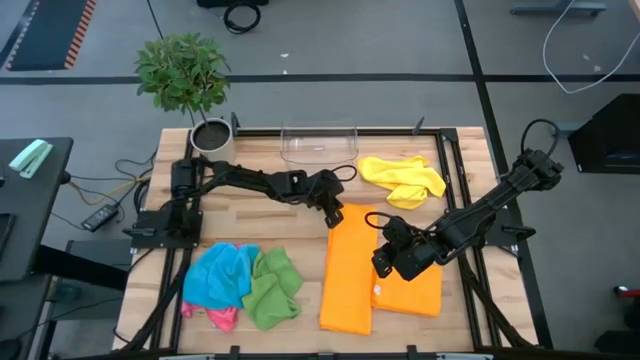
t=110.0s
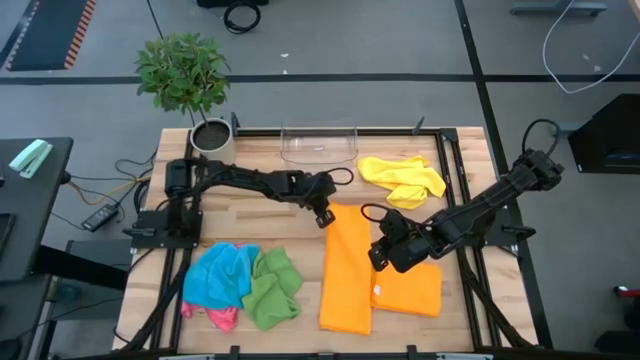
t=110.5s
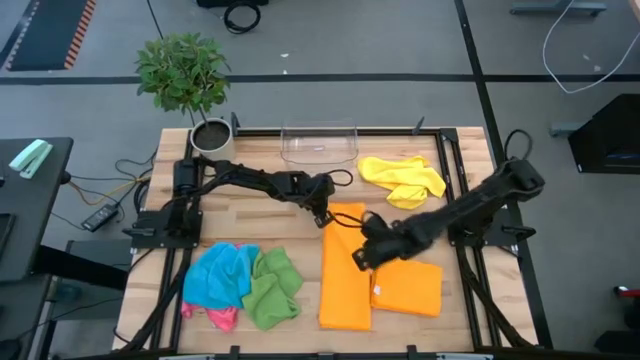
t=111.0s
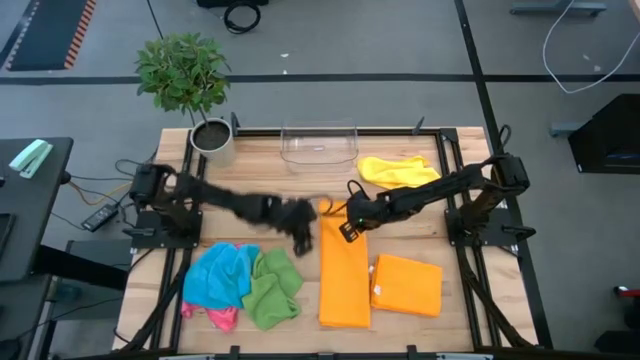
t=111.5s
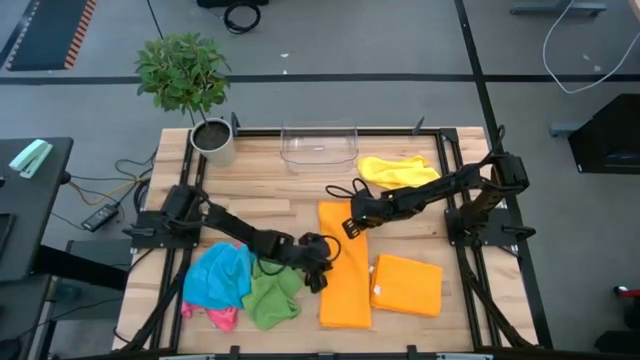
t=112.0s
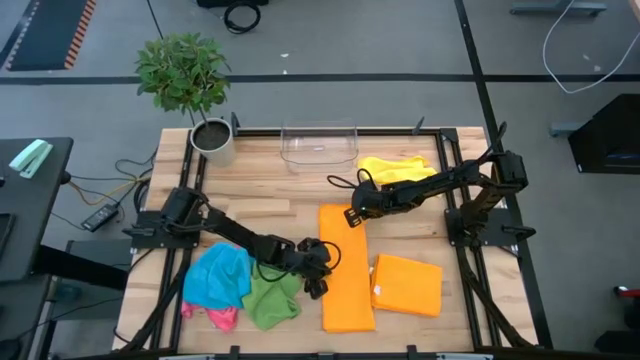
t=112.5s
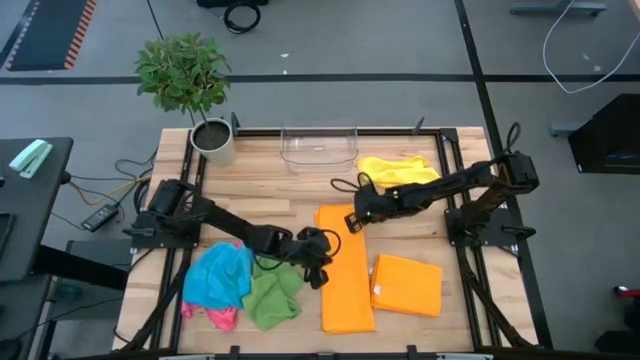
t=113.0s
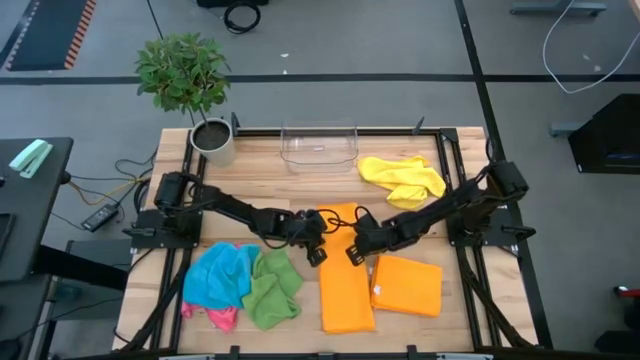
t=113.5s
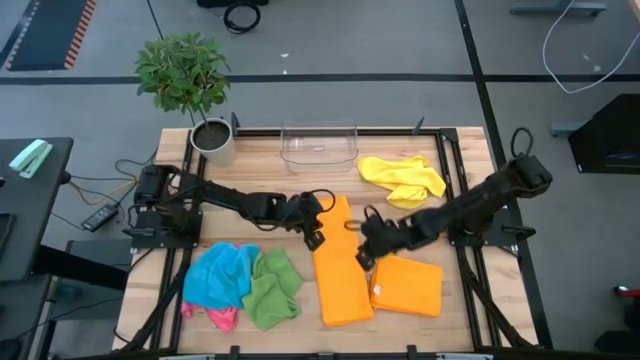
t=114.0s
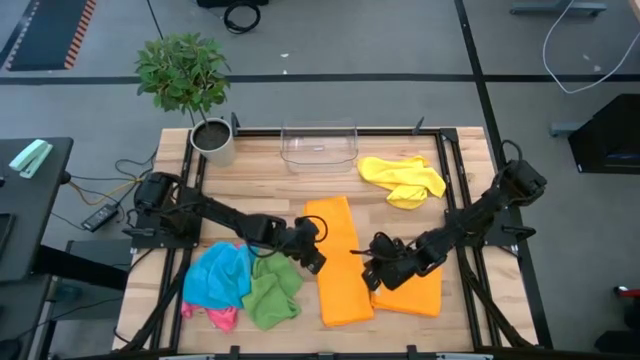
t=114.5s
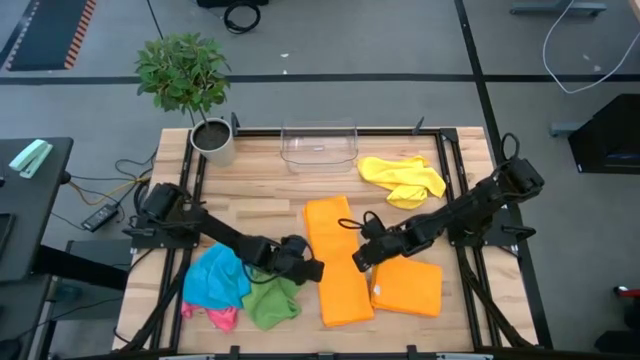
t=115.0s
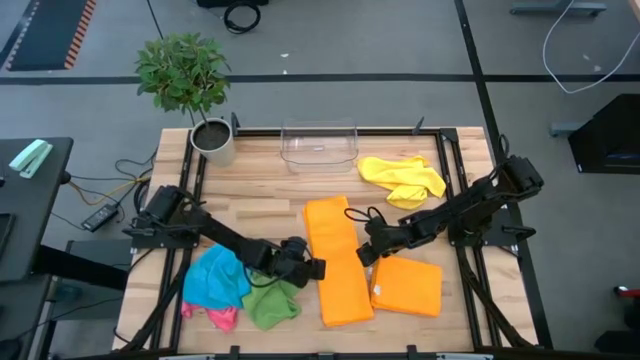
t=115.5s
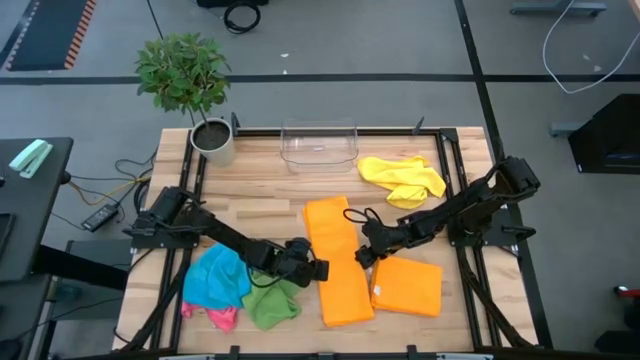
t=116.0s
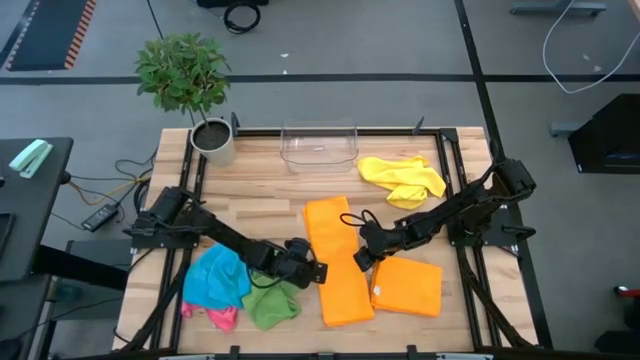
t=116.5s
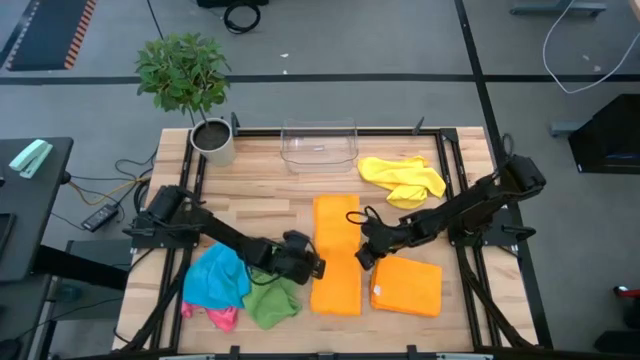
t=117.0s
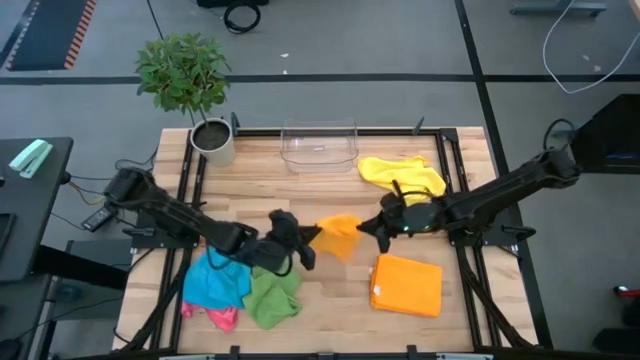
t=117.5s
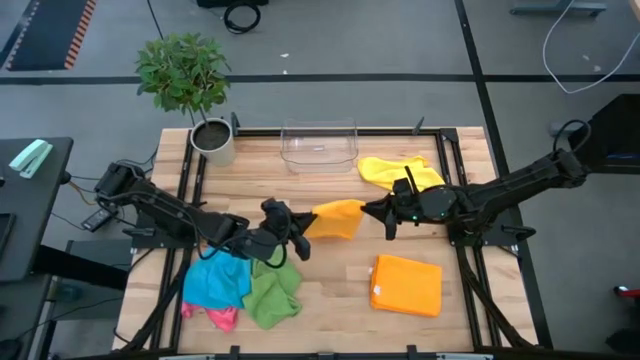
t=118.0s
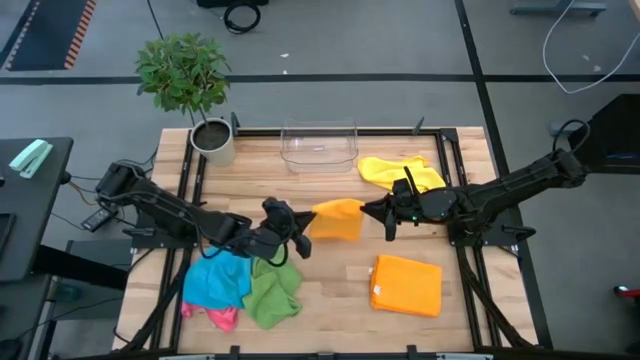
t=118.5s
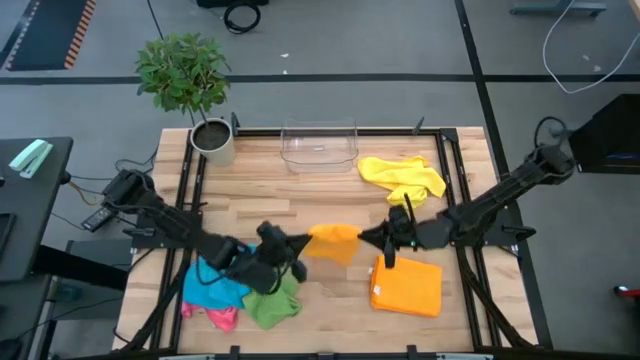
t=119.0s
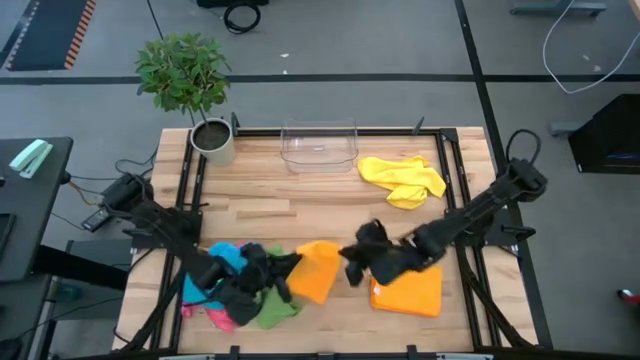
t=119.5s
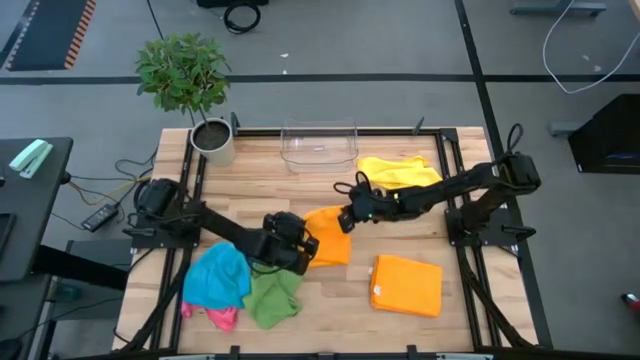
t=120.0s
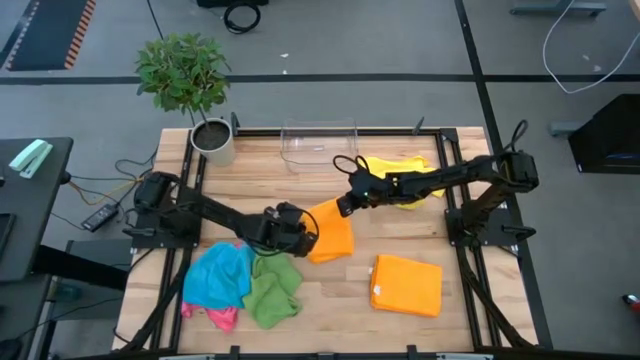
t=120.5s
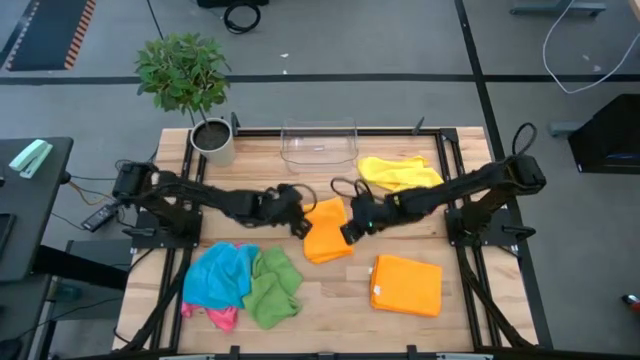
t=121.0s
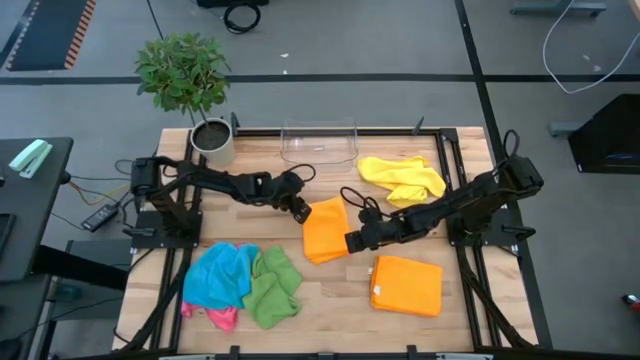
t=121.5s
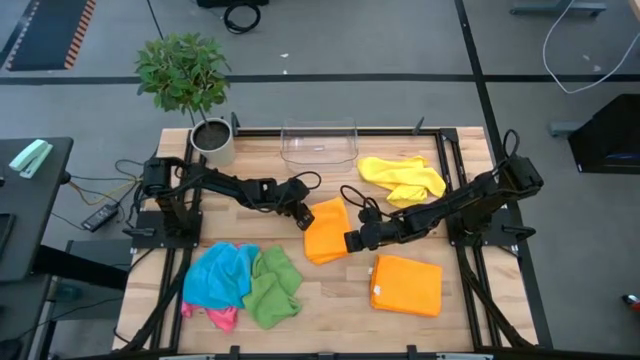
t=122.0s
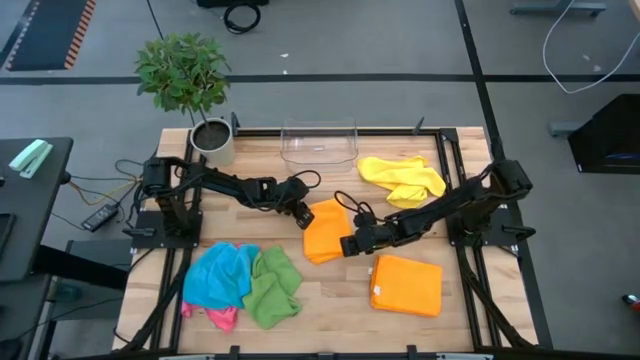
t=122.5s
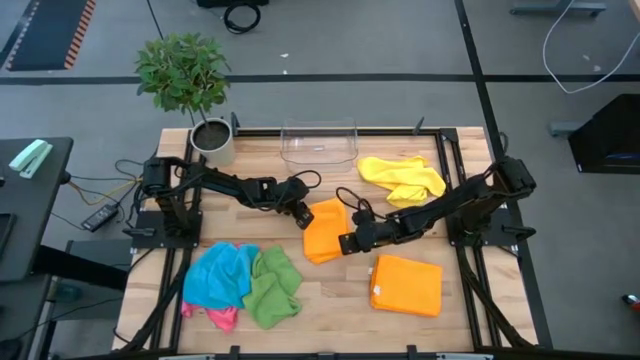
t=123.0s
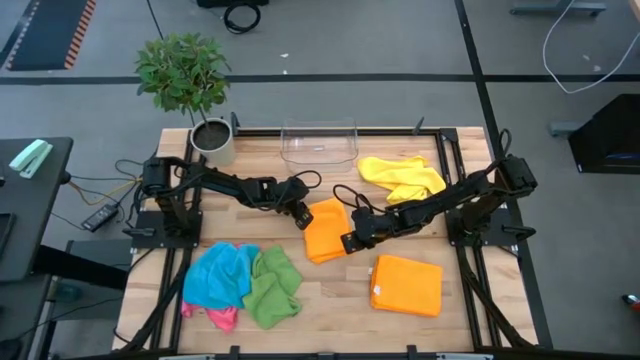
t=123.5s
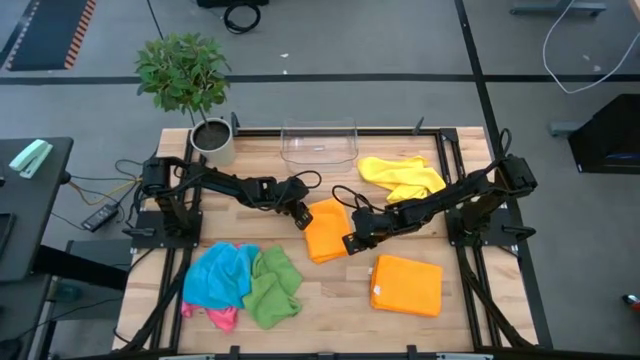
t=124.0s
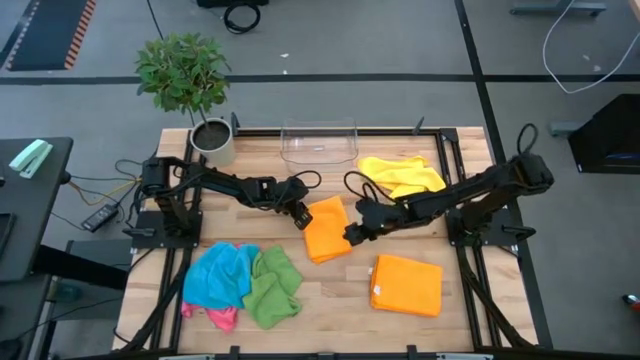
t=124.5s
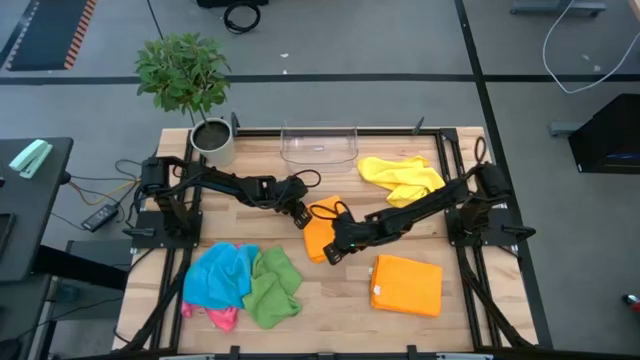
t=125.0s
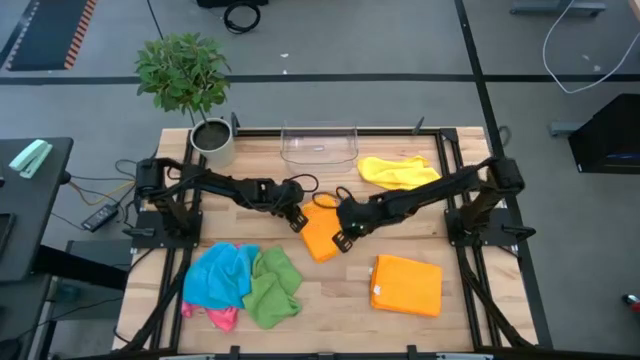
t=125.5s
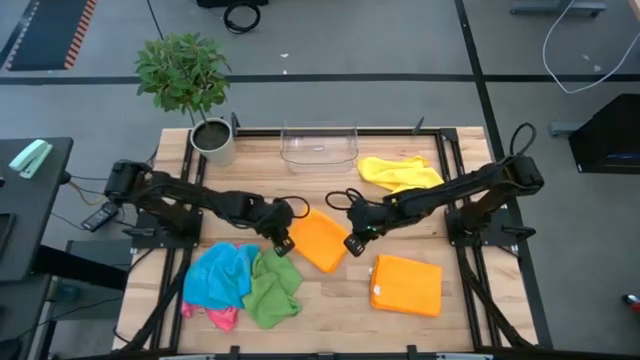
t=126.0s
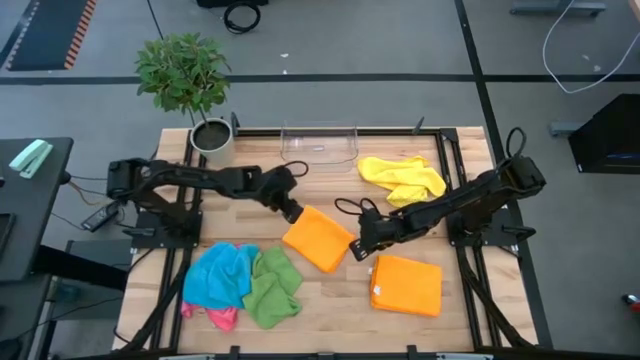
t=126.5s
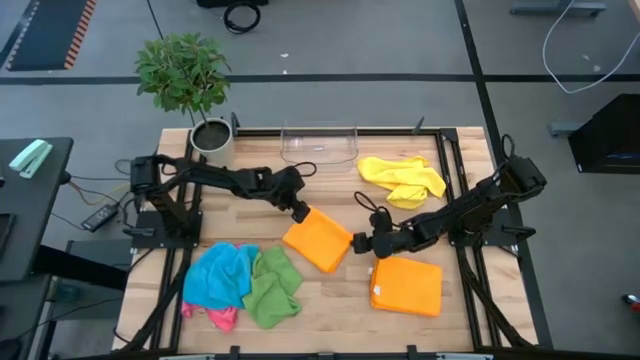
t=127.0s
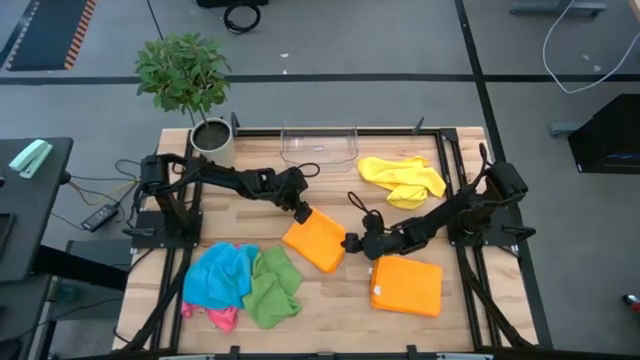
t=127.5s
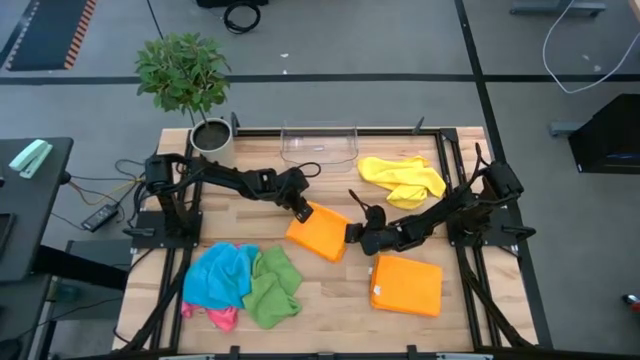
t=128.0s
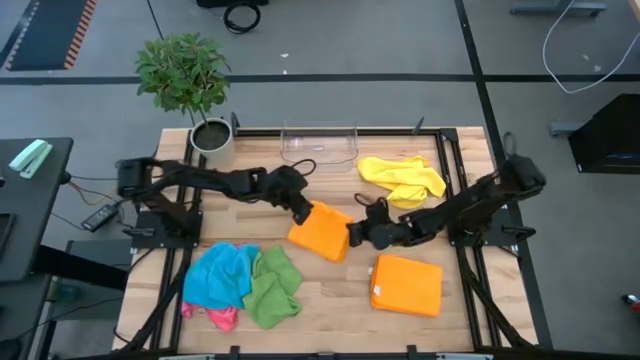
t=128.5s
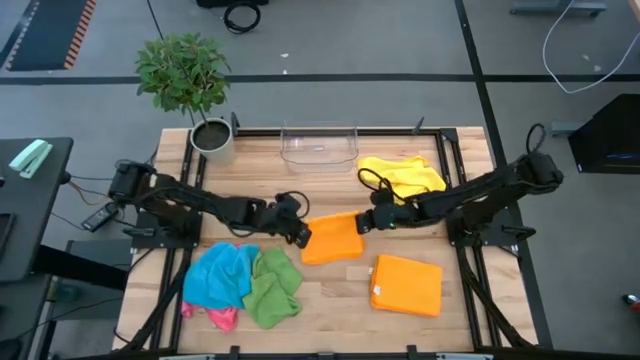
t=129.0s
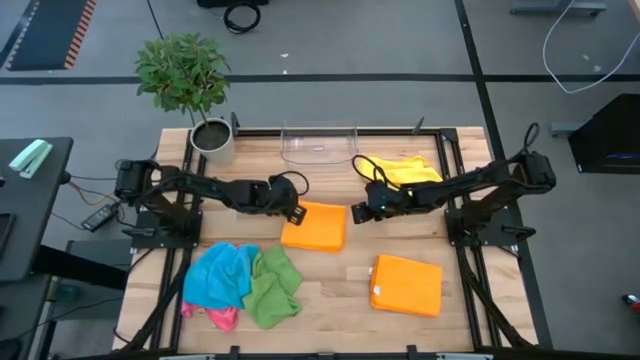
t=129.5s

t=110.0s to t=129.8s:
Task: Fold microfiber towels
Fold the orange towel on the table
